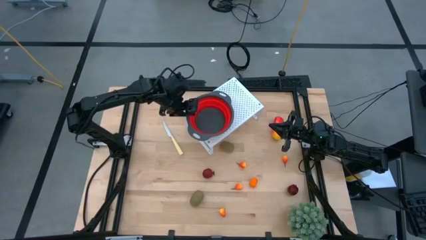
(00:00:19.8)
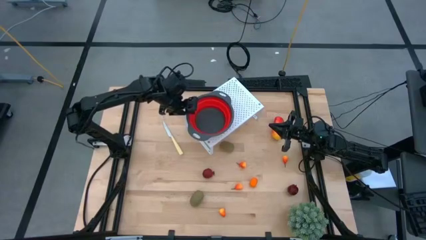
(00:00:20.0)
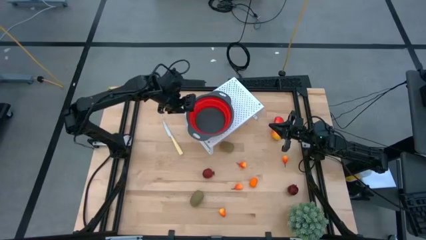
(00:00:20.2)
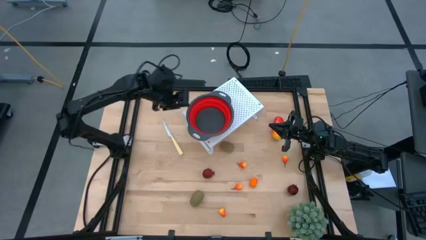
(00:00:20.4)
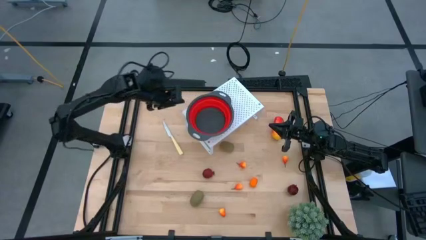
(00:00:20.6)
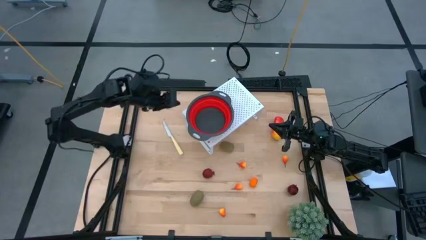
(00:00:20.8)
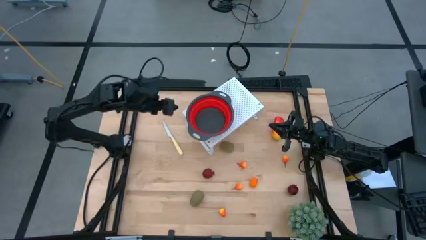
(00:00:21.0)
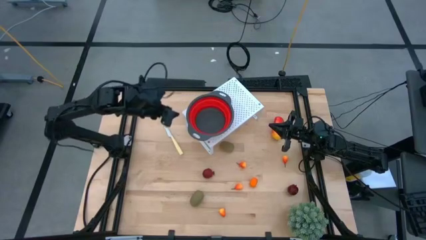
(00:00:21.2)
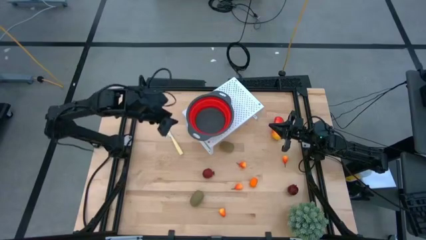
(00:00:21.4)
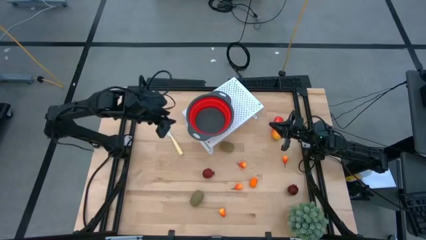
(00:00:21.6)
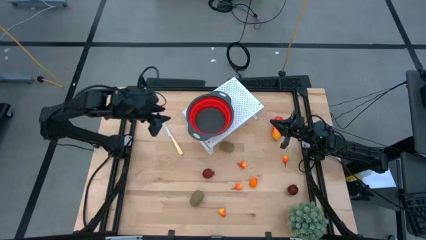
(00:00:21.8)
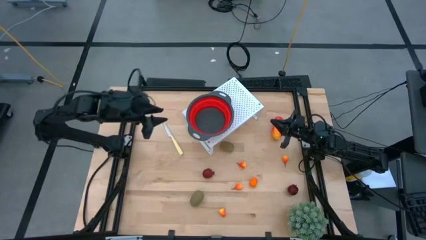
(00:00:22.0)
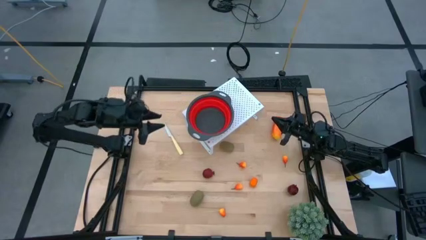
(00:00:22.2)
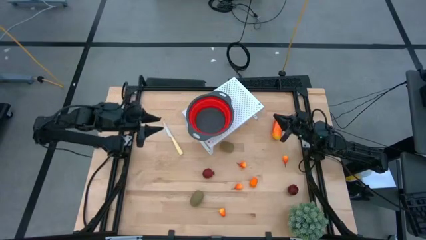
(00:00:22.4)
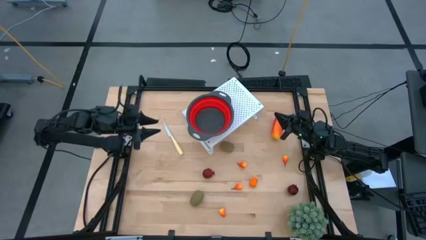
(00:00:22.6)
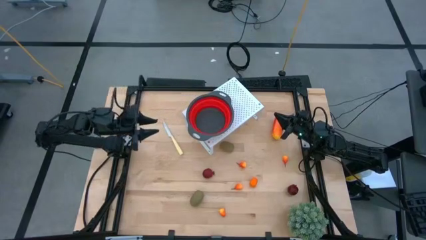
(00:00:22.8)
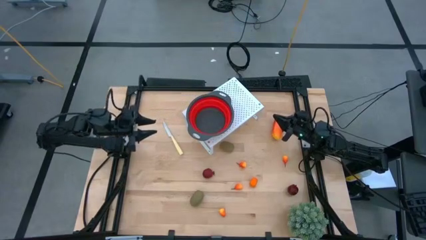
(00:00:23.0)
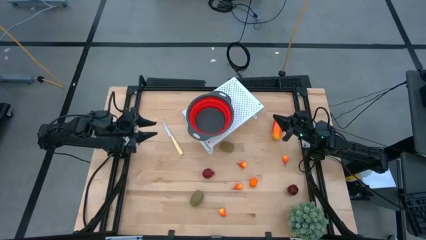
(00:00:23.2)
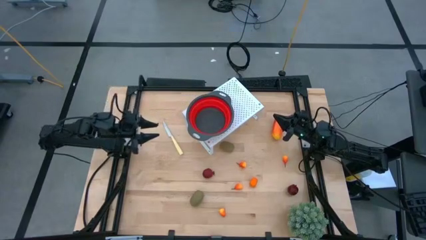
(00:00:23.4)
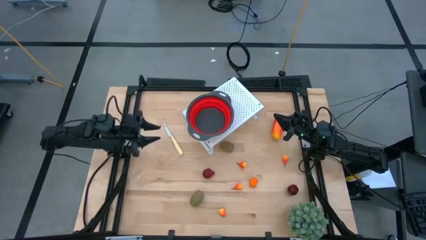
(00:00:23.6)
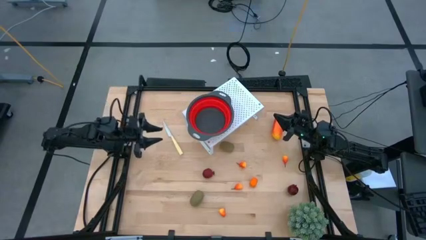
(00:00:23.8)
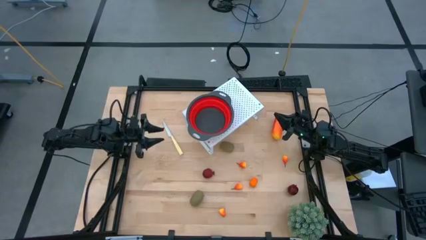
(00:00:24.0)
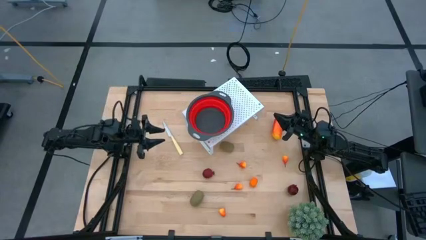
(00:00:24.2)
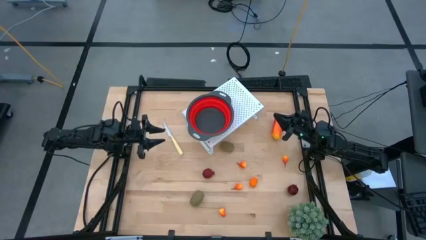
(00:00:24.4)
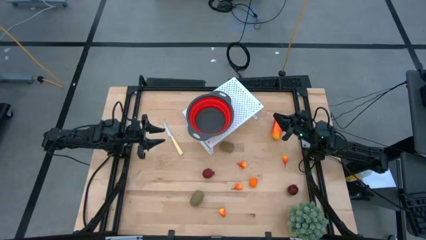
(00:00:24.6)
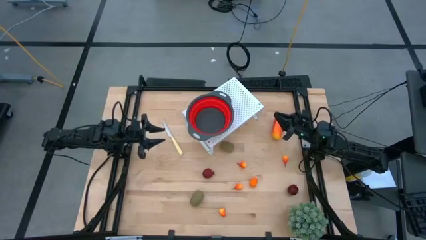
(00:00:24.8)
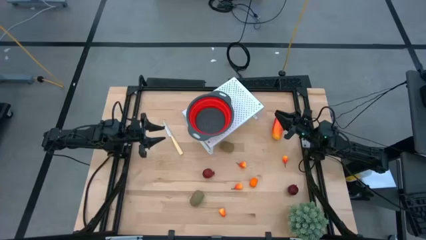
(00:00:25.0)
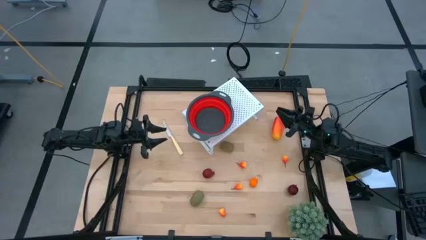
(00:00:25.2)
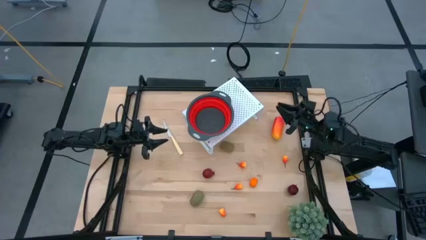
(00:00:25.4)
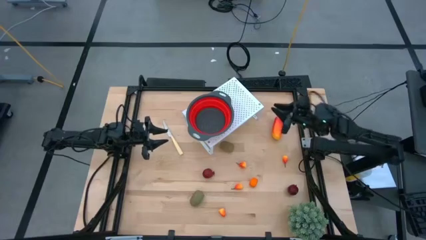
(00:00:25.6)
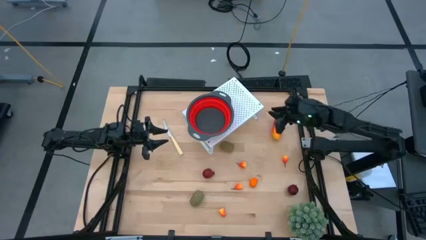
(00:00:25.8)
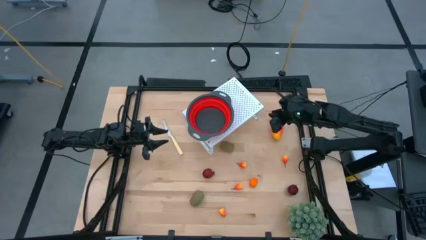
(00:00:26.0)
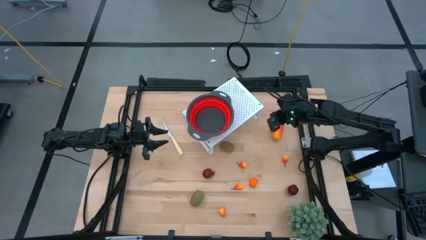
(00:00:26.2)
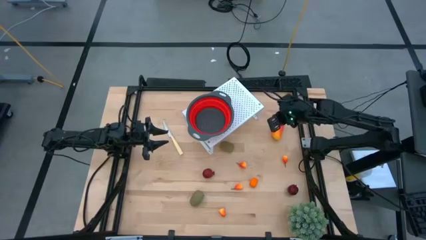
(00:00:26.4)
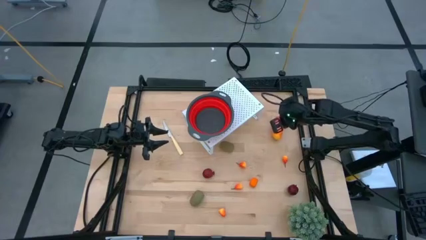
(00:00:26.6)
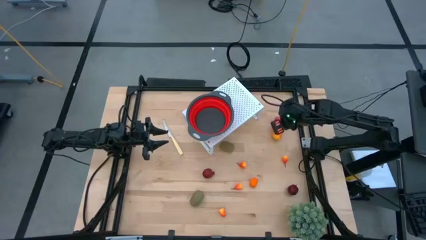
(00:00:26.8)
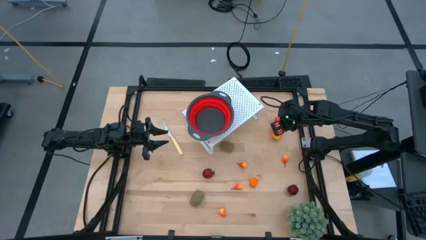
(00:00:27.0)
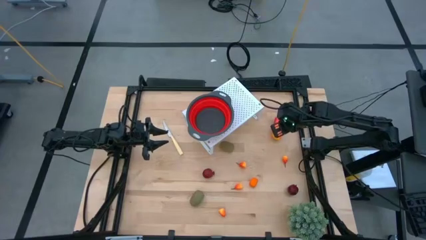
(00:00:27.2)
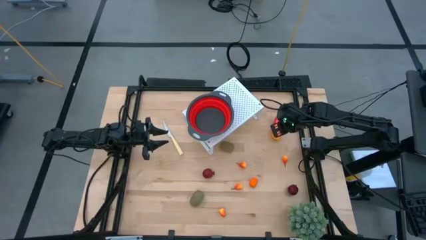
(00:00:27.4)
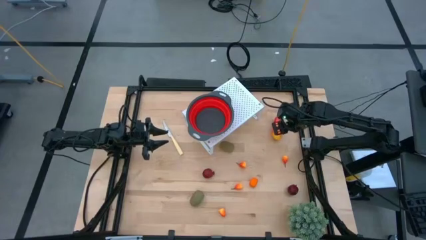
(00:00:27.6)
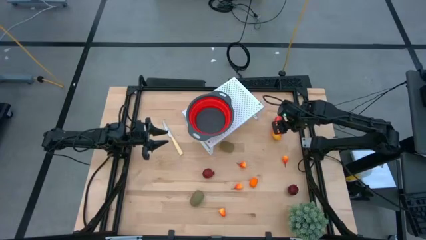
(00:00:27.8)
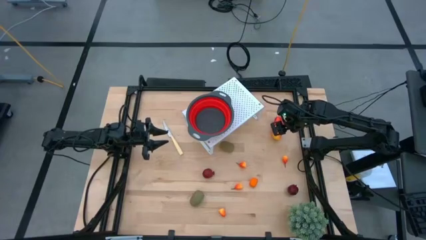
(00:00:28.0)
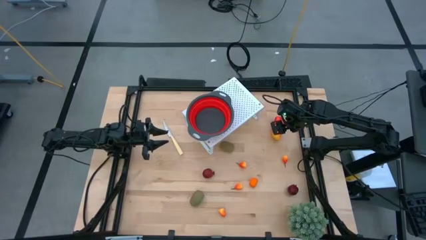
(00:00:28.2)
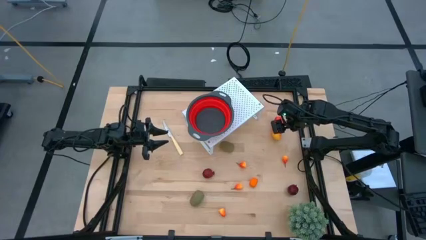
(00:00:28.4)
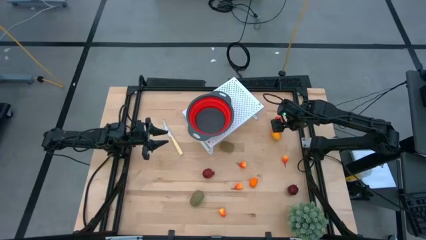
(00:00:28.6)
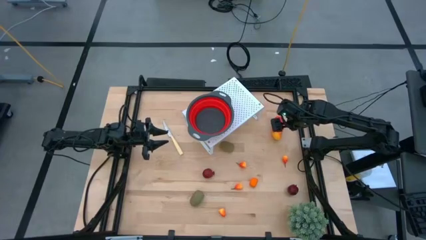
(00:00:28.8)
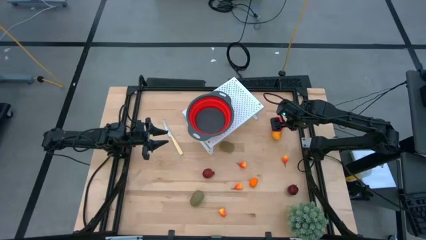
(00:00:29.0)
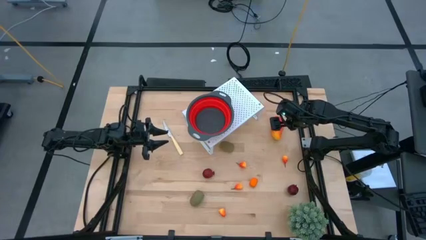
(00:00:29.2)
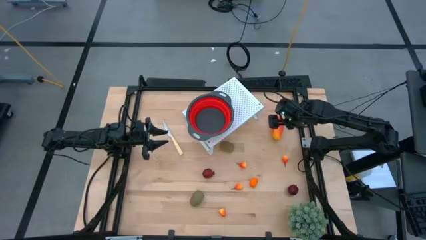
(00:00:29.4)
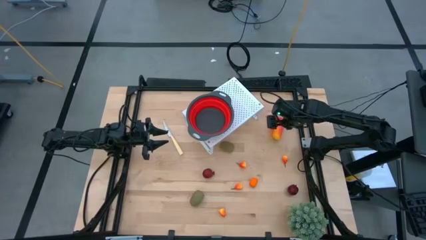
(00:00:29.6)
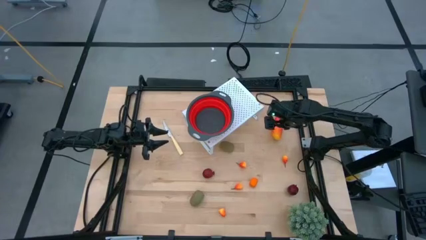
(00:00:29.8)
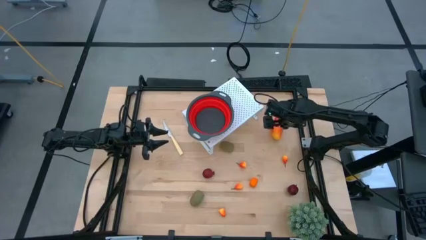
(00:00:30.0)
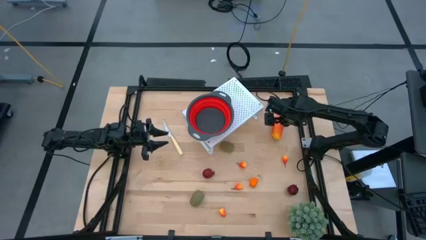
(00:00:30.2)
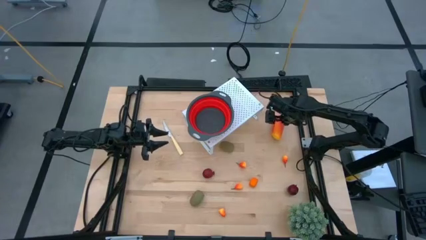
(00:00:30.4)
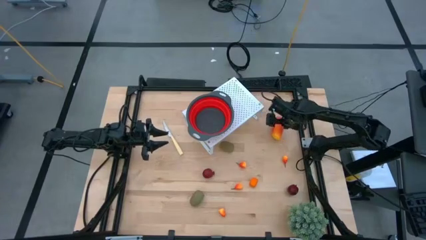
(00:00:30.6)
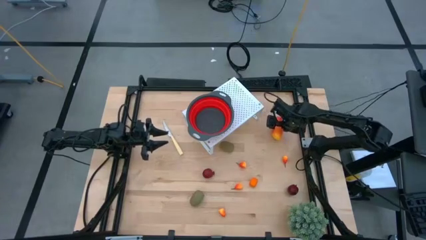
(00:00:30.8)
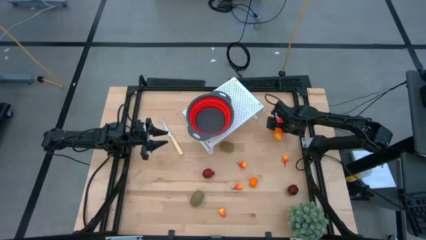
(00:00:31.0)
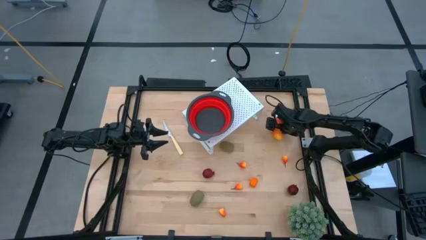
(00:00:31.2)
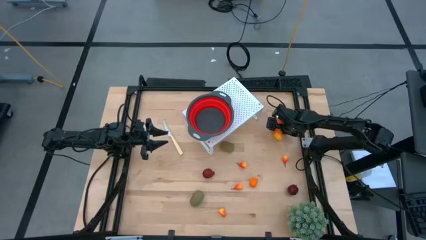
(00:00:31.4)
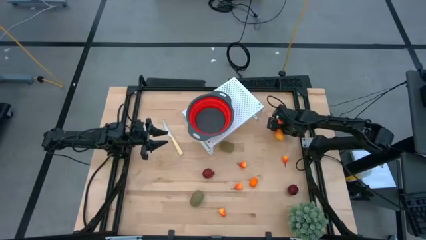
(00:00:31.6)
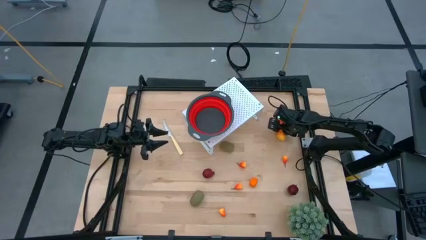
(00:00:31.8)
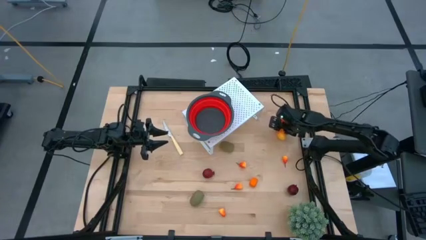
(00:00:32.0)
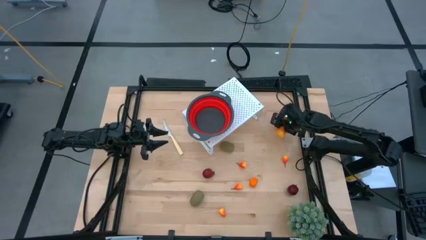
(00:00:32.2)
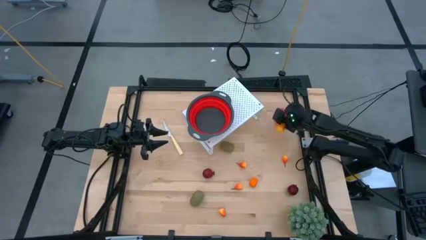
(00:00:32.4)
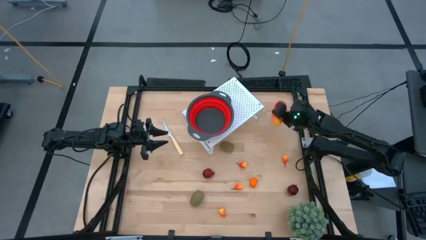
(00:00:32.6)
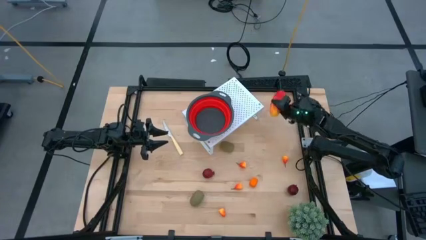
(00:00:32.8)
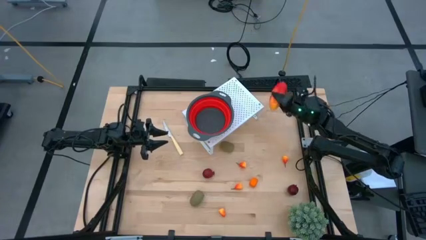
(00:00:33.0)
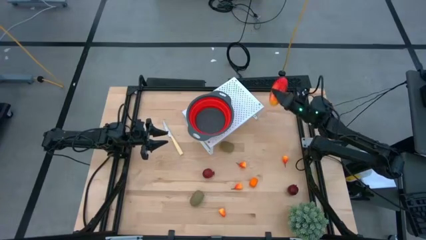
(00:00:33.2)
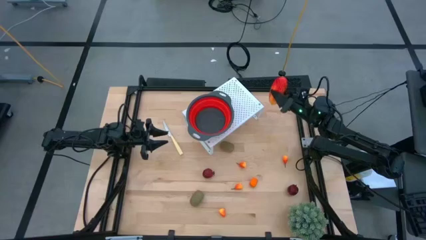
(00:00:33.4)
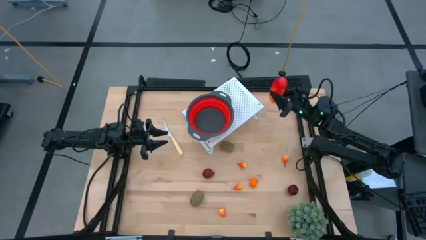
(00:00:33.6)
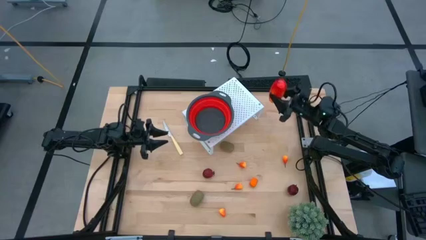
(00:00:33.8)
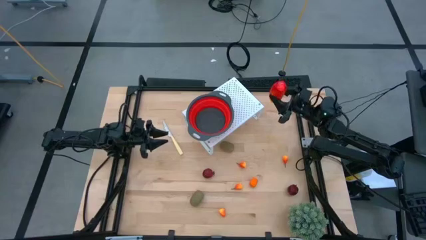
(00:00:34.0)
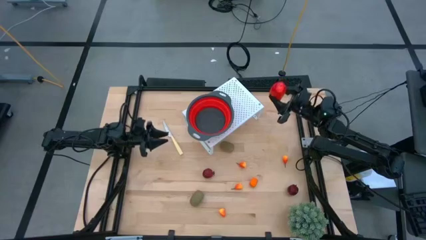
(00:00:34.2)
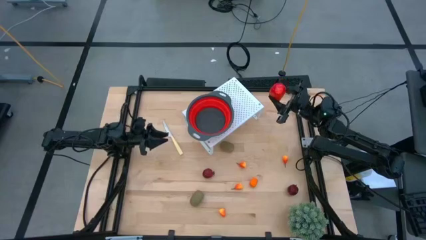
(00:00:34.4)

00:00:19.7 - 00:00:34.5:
Task: Pick & Place Fruit
Put the mango into the red strainer bowl on the shelf
